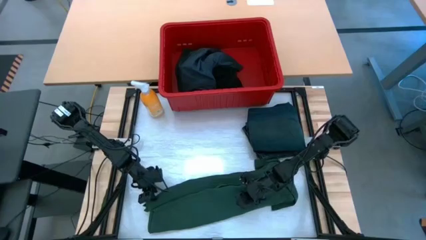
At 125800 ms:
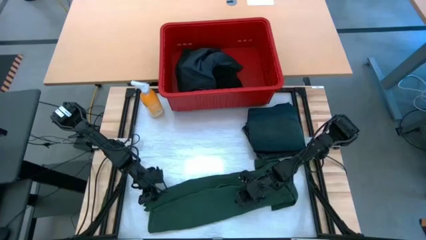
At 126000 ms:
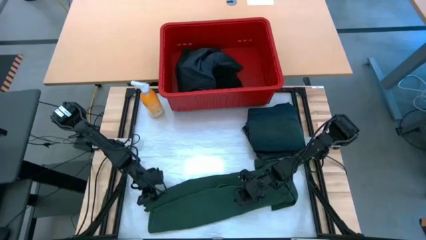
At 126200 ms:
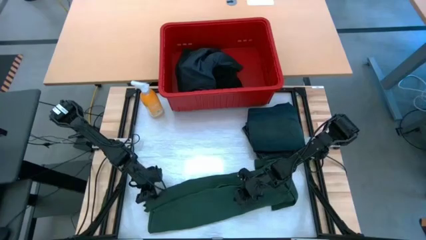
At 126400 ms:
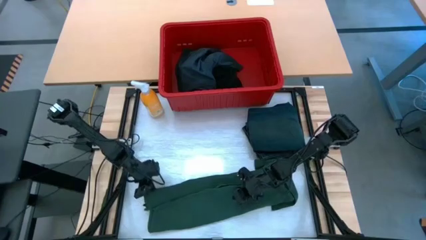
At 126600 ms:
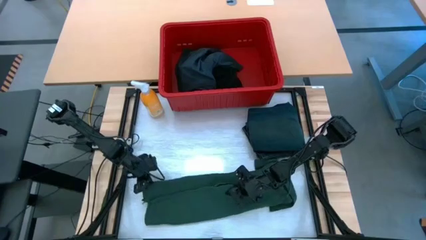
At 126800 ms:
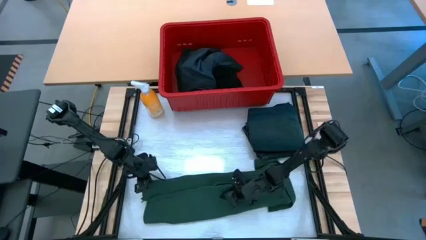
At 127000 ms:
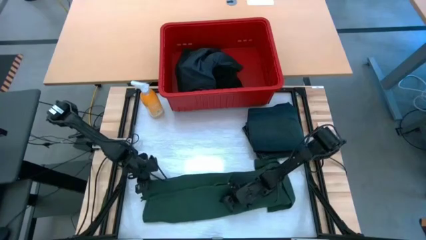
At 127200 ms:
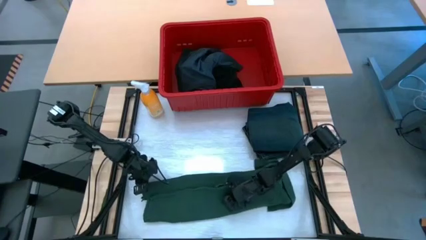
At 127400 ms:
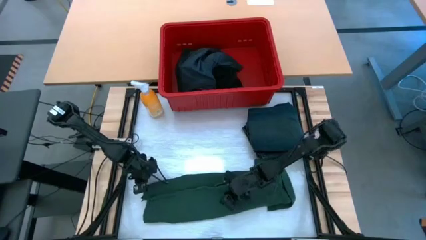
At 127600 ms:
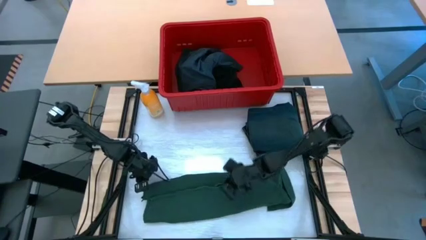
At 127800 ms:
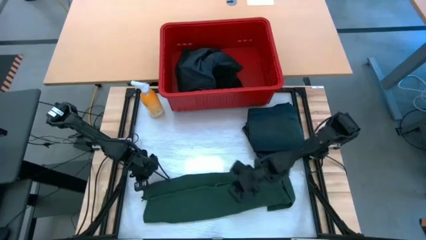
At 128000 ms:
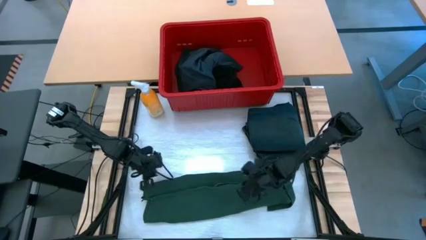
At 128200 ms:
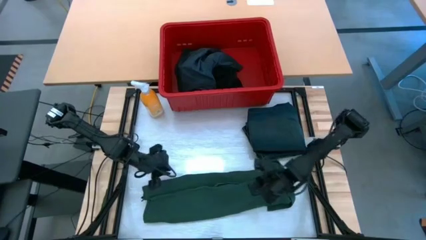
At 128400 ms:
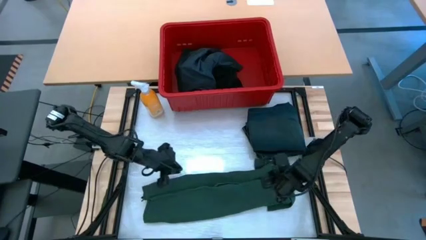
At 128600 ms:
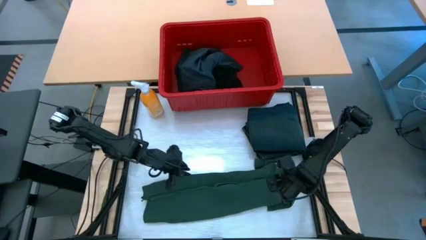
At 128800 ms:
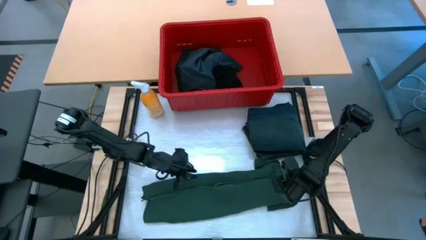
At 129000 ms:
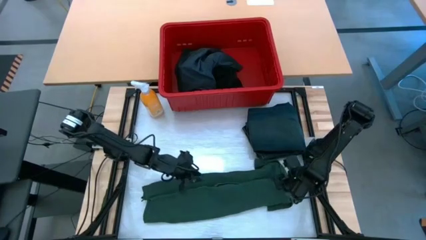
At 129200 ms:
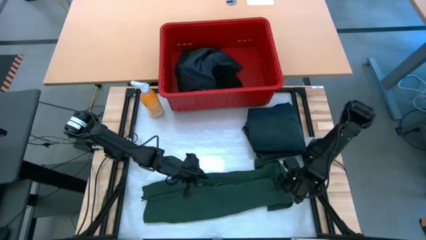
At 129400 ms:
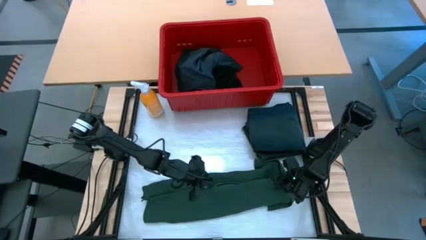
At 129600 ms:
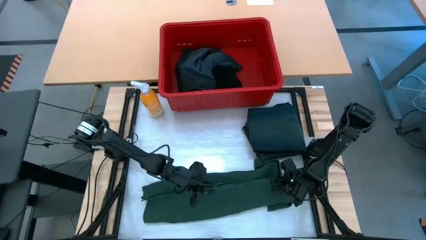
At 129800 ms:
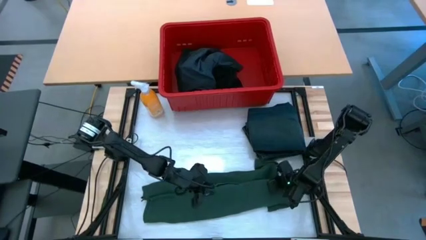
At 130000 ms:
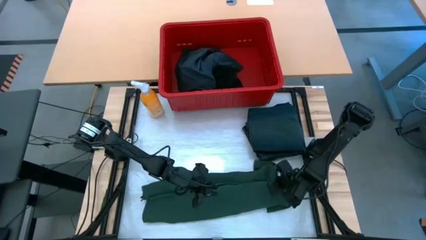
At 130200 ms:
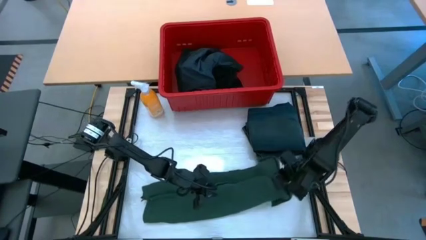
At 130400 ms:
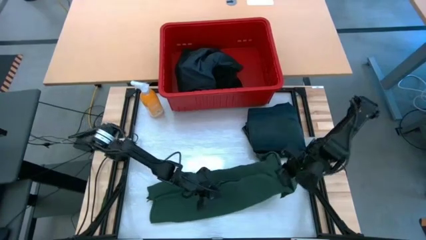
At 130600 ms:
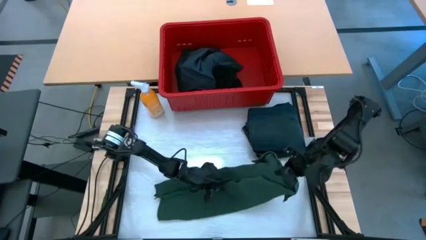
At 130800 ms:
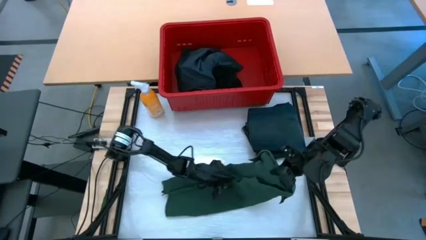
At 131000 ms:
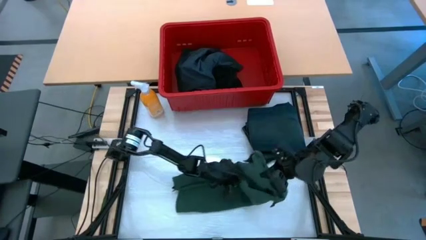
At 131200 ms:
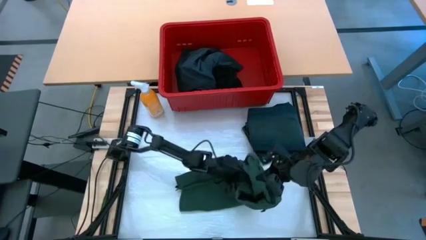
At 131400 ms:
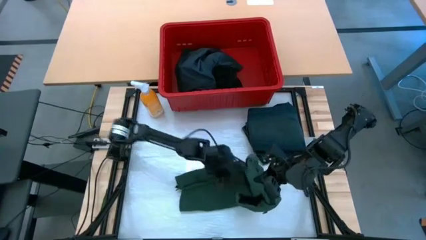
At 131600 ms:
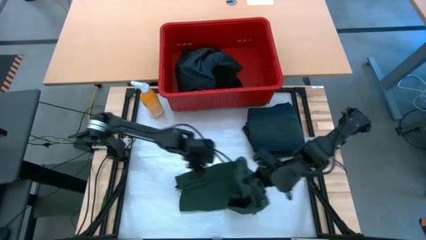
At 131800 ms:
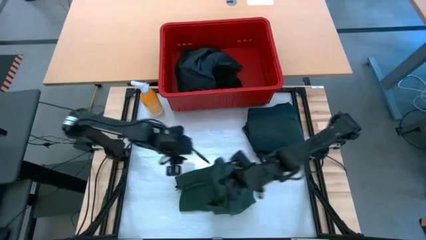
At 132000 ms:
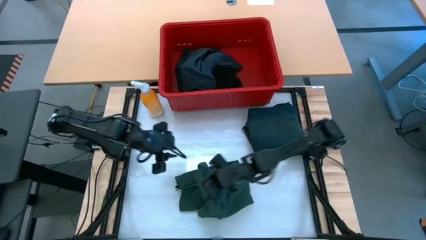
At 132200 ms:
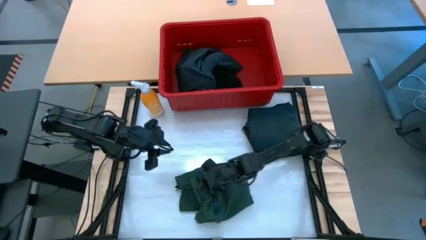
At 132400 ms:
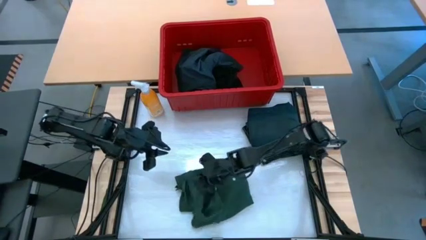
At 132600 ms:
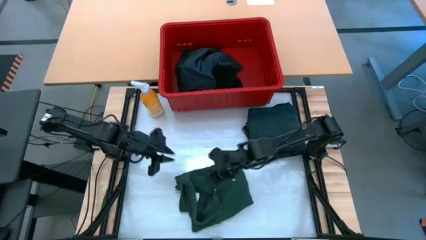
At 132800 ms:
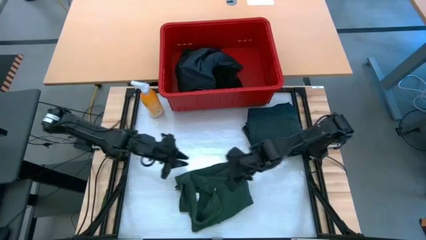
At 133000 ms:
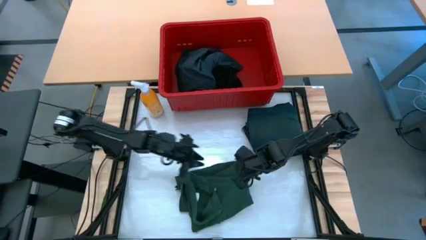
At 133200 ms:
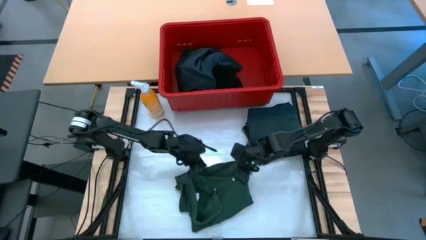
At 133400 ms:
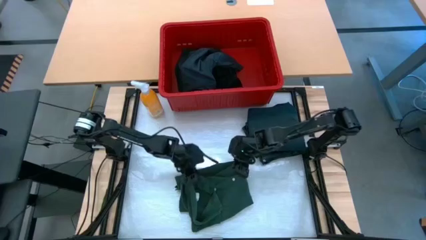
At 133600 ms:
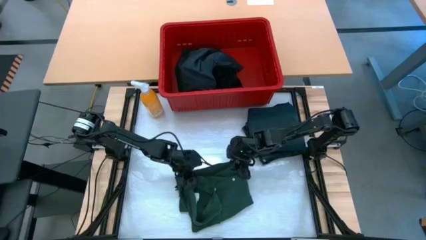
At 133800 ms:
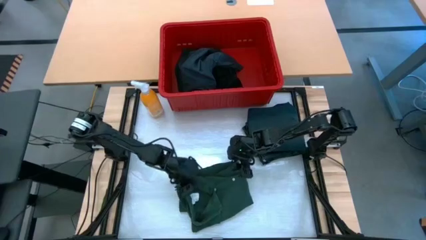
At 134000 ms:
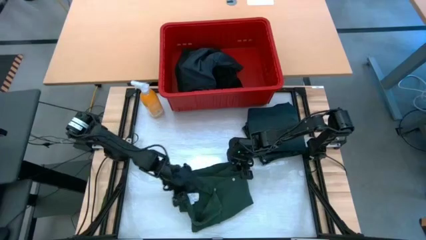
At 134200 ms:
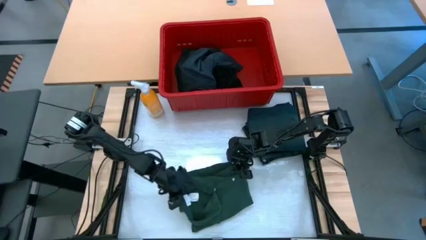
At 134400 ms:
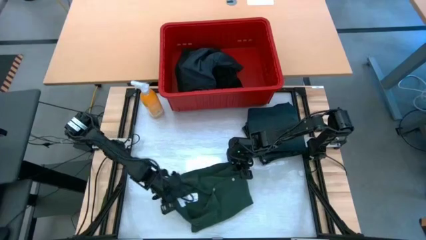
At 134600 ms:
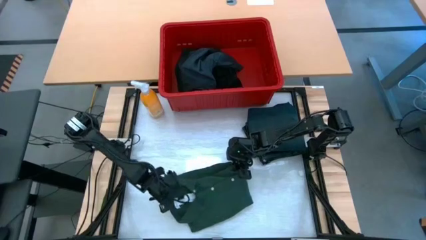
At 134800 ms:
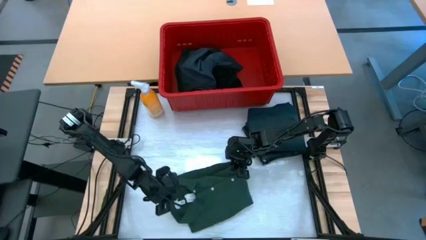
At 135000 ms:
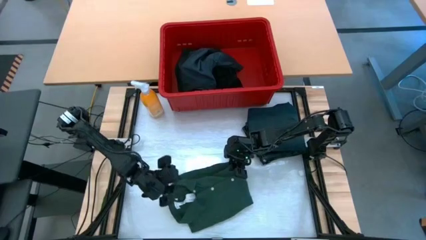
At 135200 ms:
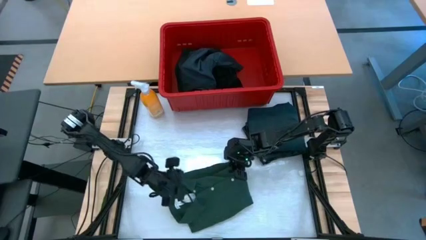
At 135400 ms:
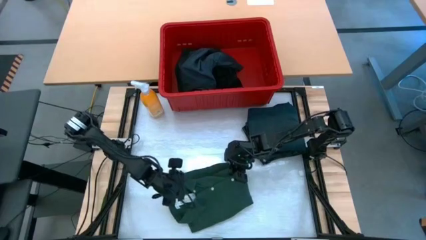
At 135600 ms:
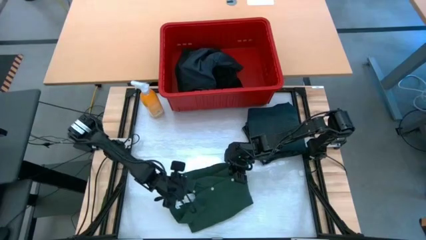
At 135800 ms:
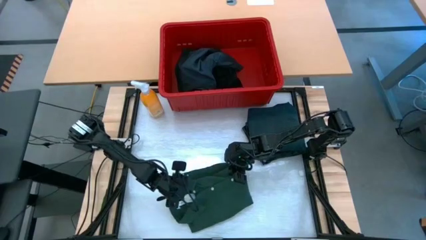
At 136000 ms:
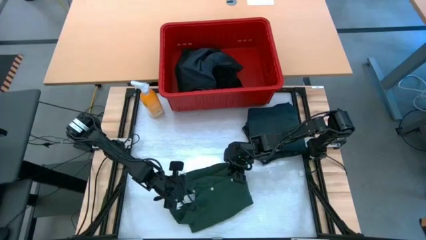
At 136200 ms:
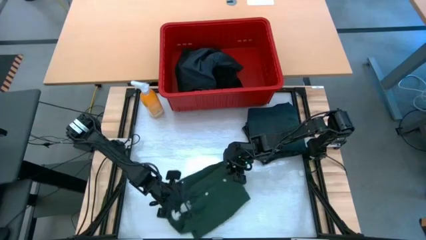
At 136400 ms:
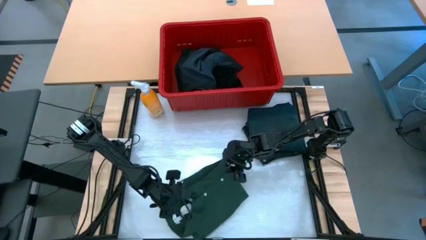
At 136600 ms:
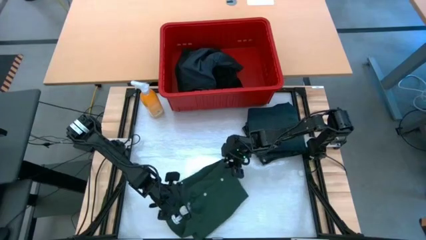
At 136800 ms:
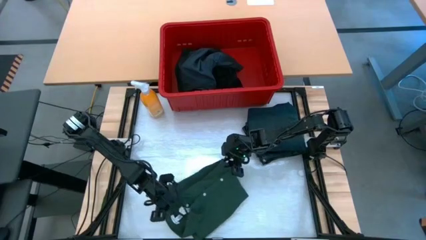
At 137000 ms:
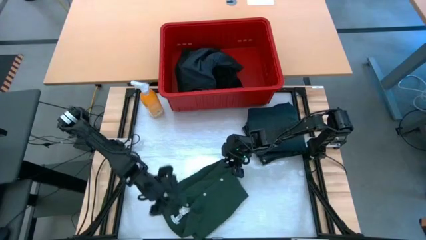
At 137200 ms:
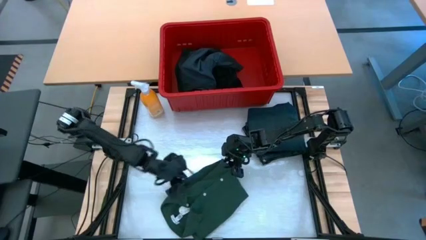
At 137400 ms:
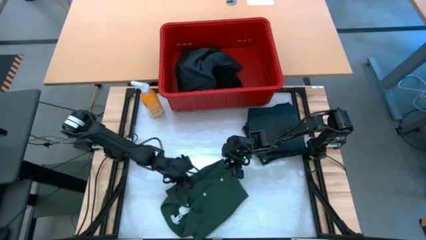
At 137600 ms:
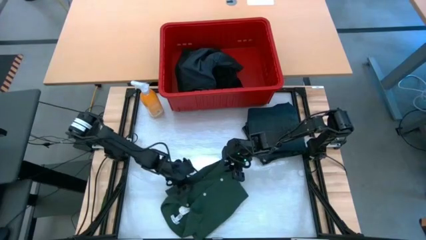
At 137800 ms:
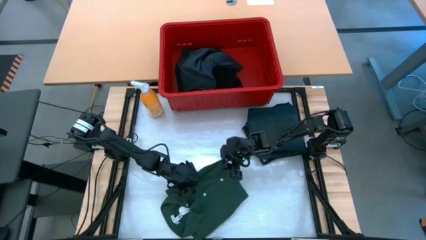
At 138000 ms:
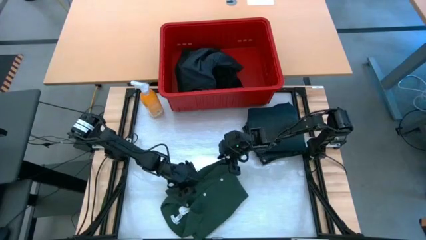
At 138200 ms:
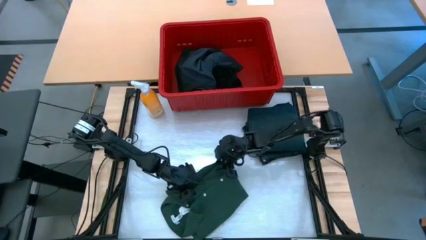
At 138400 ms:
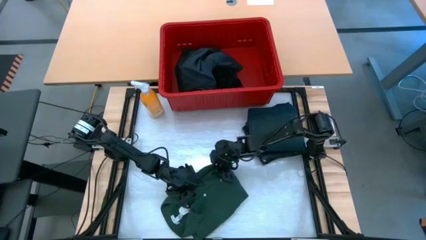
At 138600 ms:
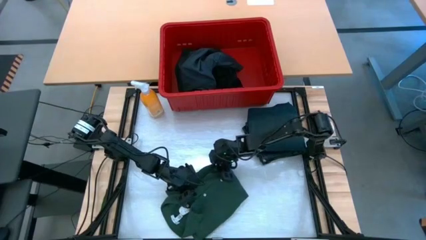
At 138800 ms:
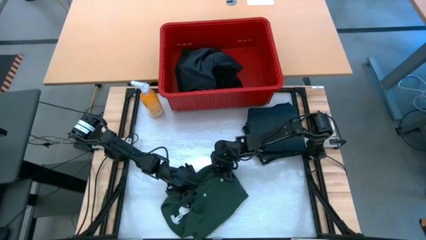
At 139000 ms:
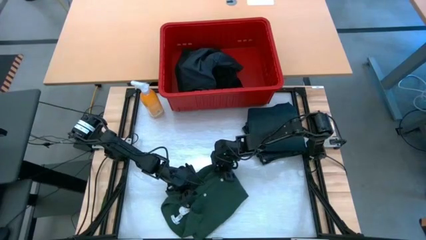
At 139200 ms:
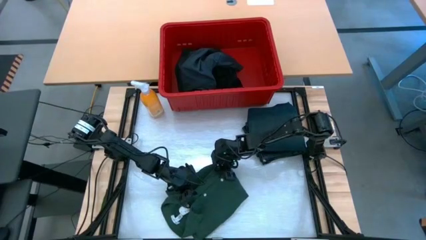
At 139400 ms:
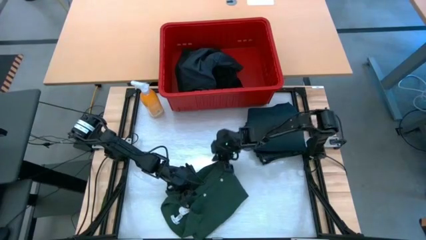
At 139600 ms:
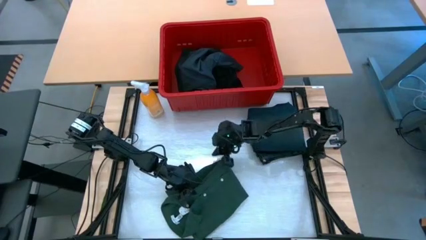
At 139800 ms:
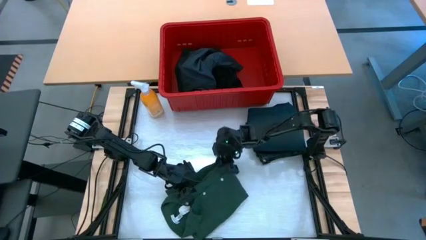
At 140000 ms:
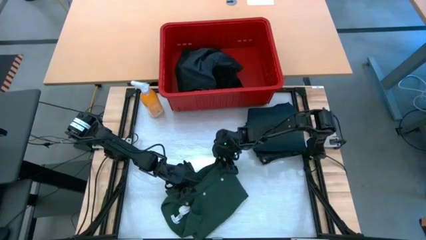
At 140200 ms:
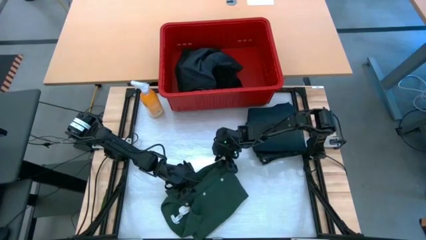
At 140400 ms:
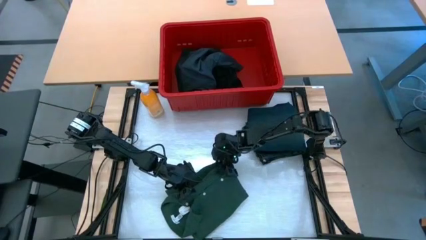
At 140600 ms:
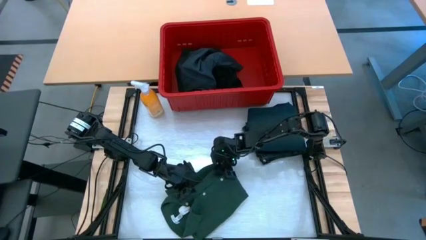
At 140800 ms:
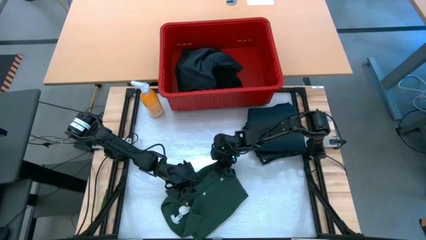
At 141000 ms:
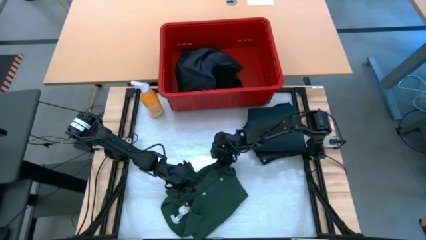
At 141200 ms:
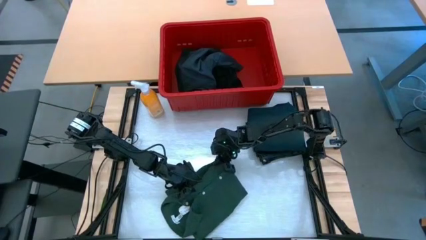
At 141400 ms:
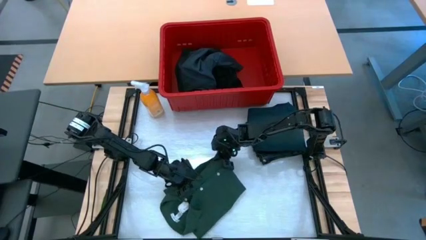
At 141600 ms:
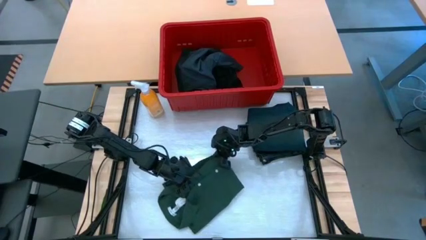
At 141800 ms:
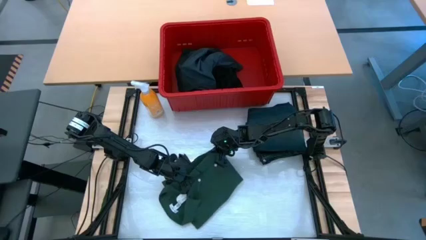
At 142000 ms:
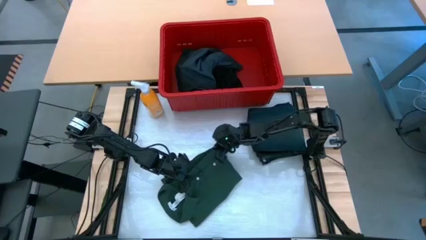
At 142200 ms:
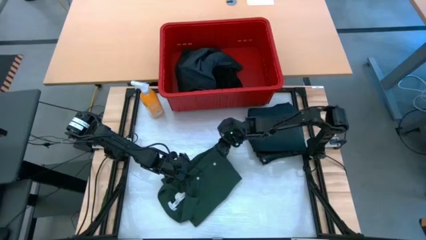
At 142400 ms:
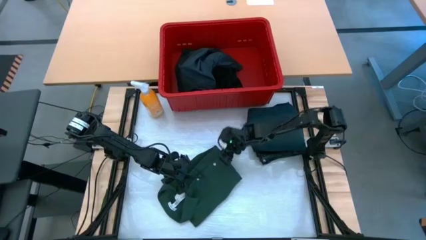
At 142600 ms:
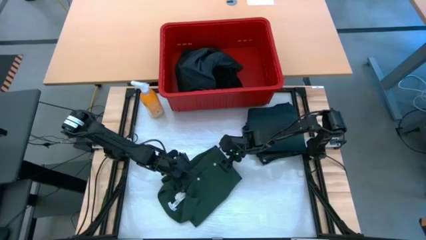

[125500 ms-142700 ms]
Task: Fold Laundry from Bin
Fold the green shirt
